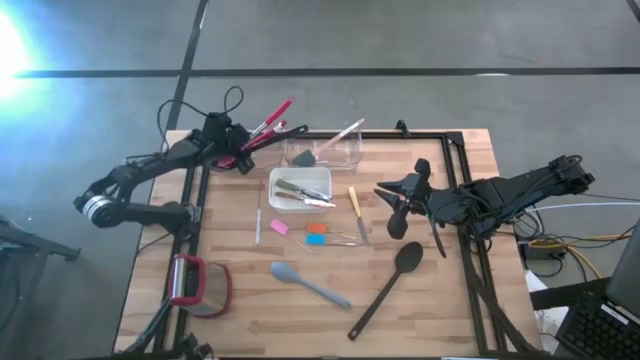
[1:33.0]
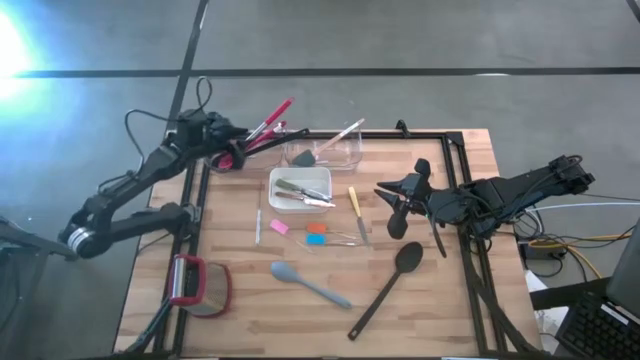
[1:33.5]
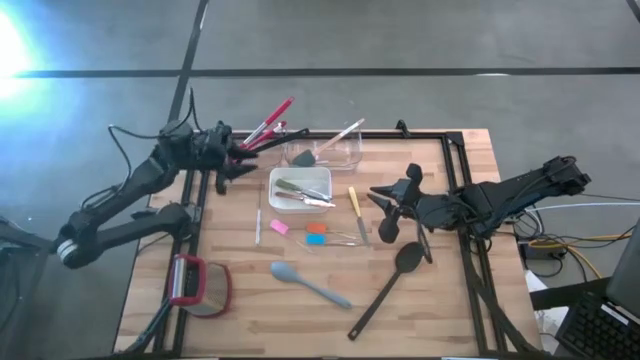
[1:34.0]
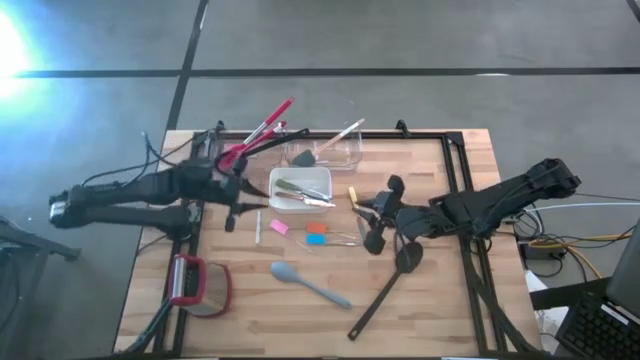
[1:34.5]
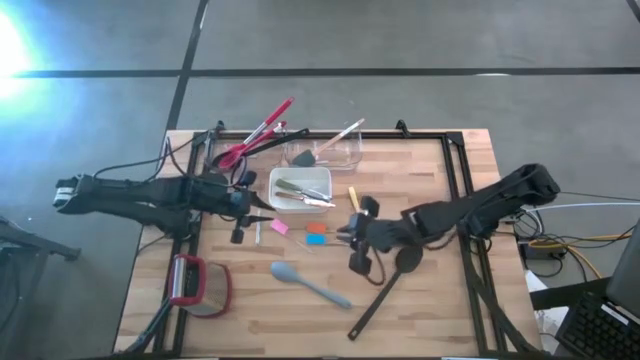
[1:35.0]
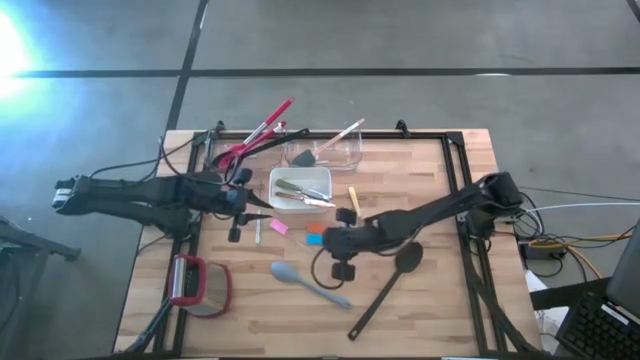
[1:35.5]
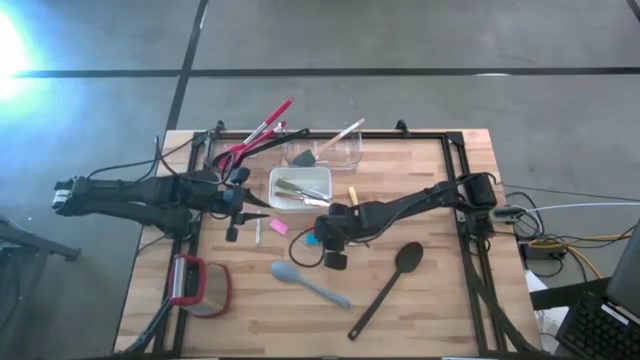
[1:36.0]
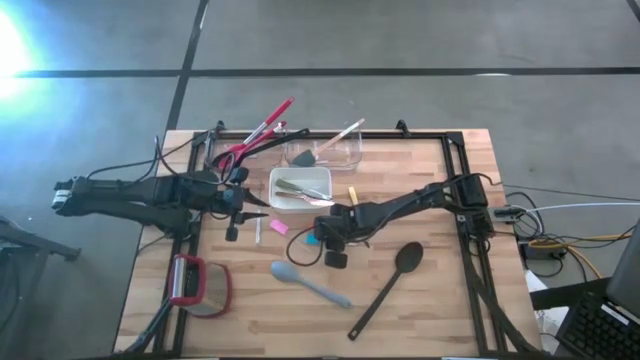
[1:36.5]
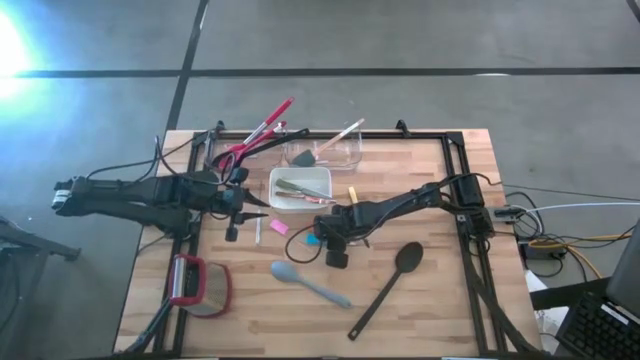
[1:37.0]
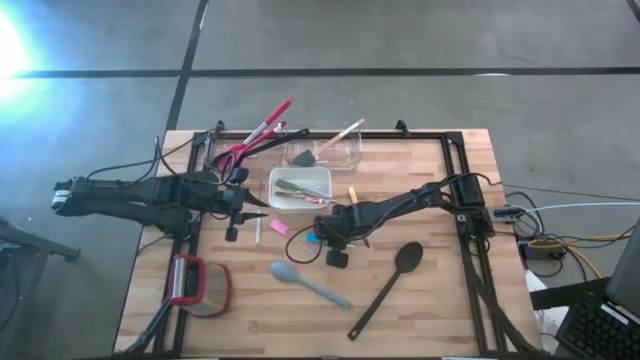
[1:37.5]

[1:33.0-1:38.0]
Task: Pick & Place Kitchen Items
Put the blue spatula into the right transparent bin

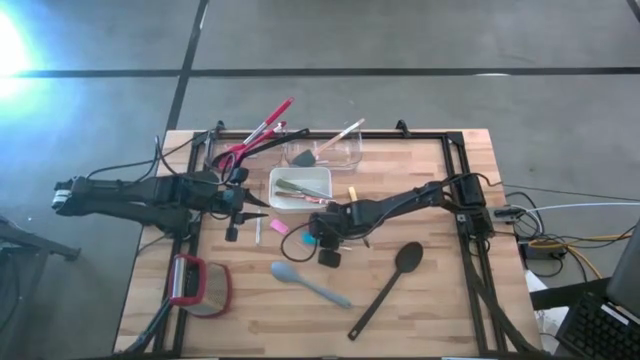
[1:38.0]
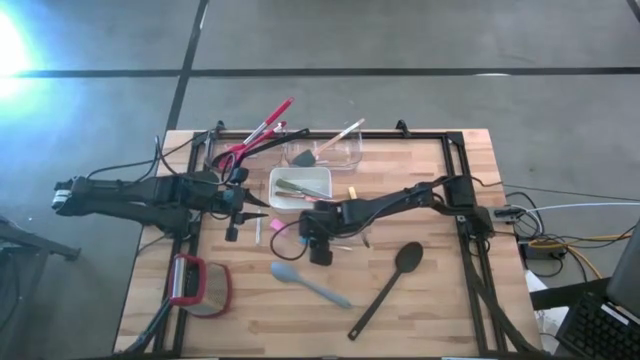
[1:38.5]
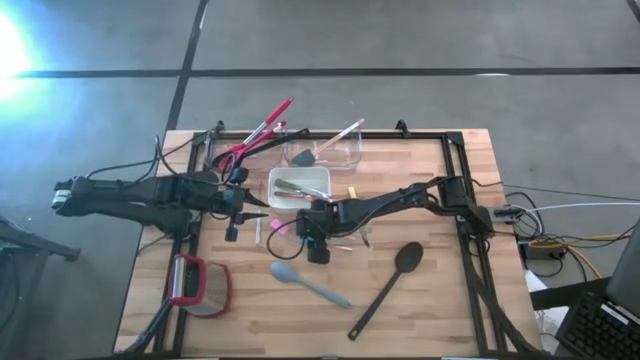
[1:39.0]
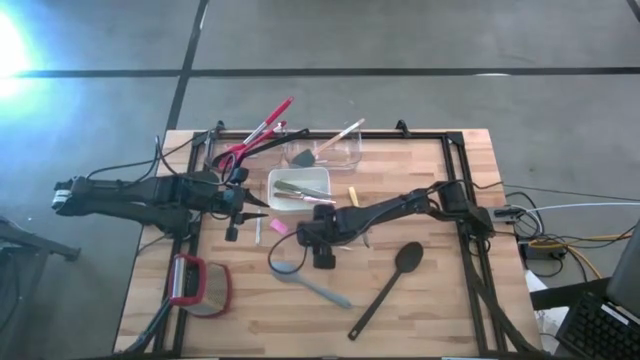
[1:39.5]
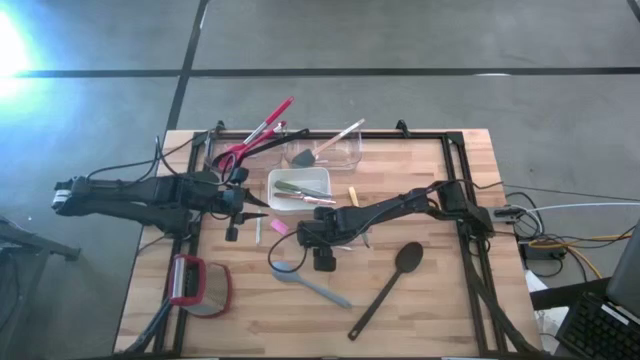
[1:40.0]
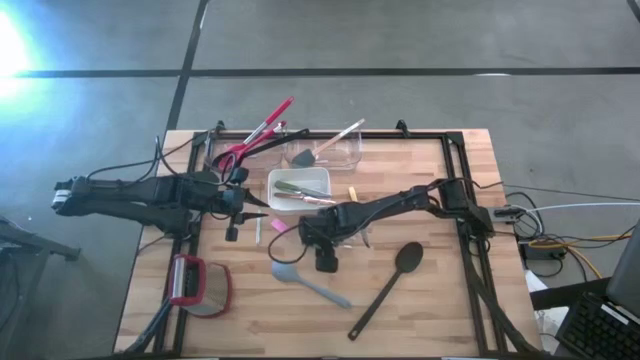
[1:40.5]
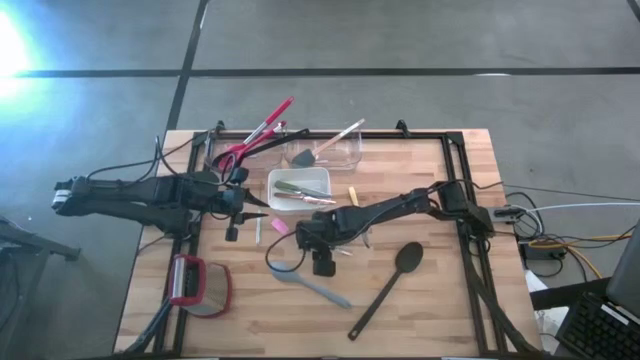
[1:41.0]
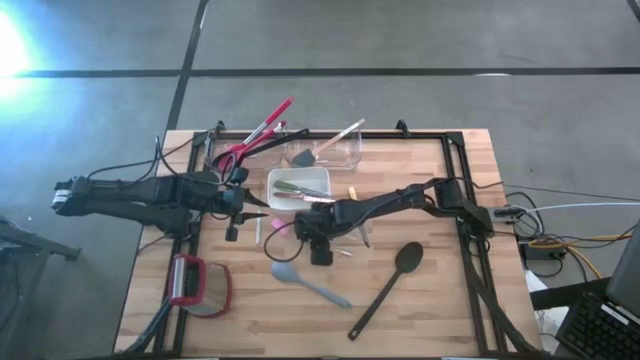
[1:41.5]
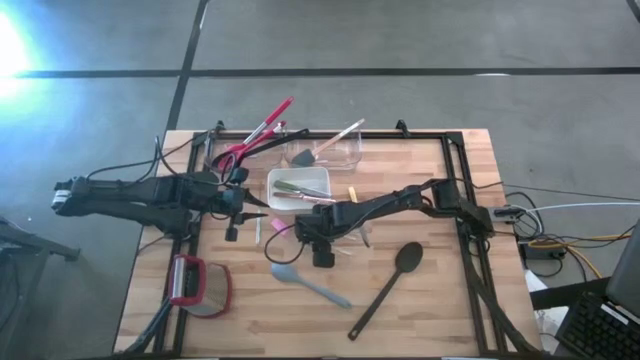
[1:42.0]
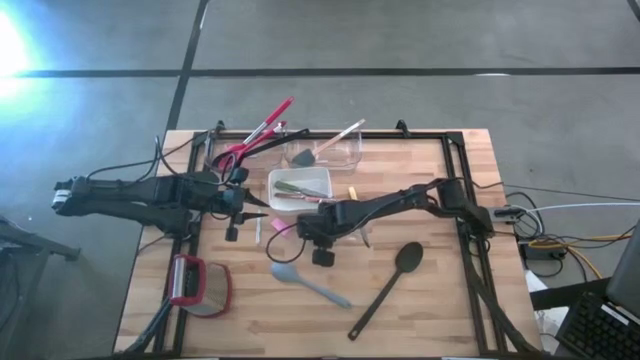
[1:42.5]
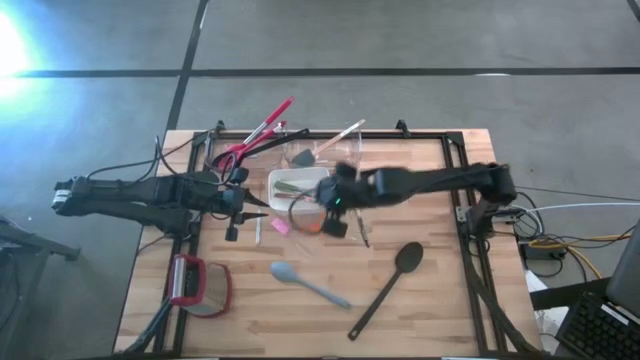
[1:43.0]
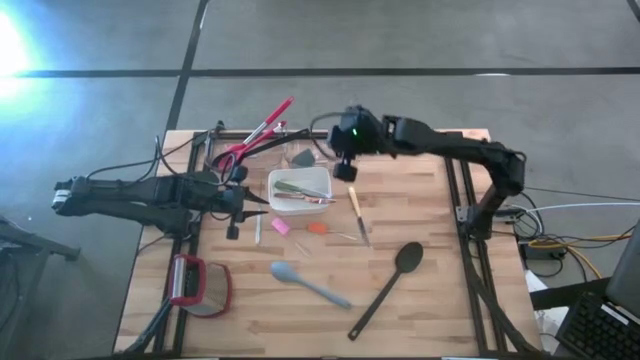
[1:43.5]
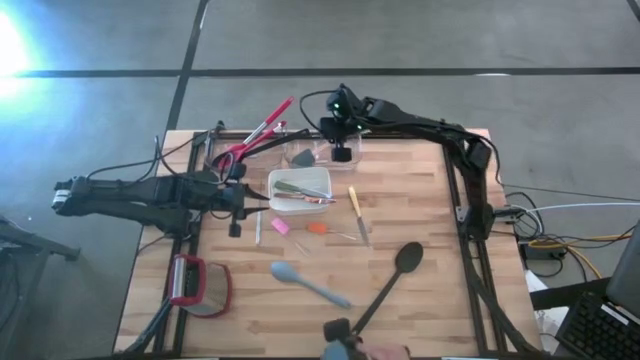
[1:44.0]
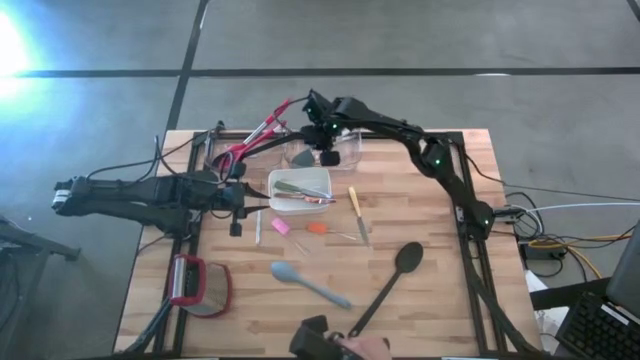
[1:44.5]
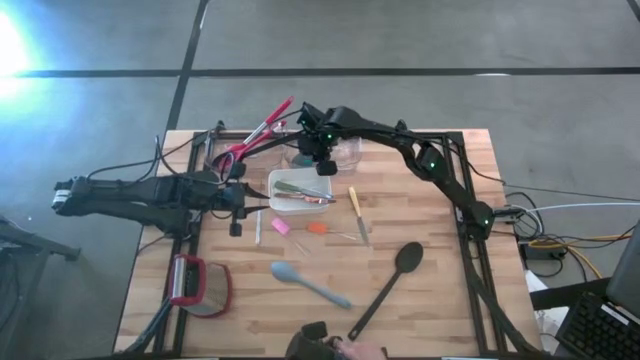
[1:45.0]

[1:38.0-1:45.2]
Put the blue spatula into the right transparent bin

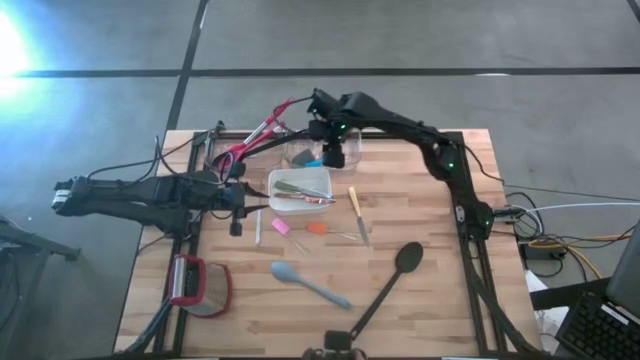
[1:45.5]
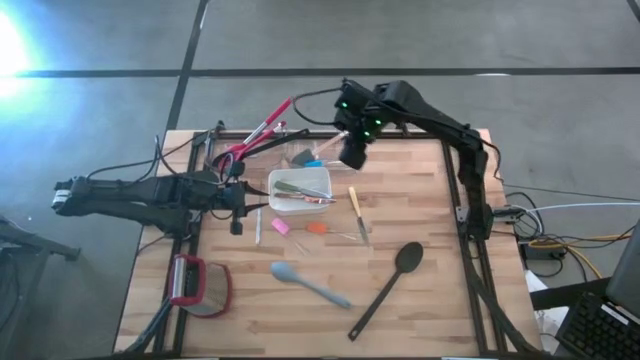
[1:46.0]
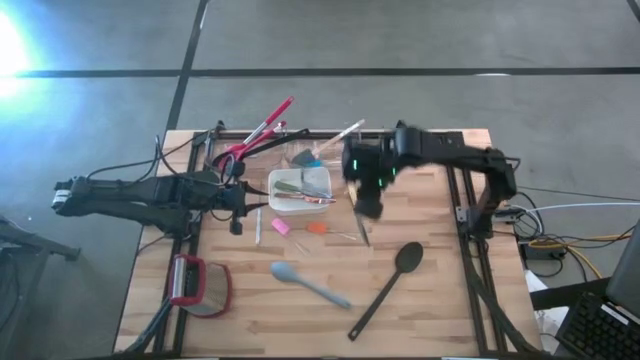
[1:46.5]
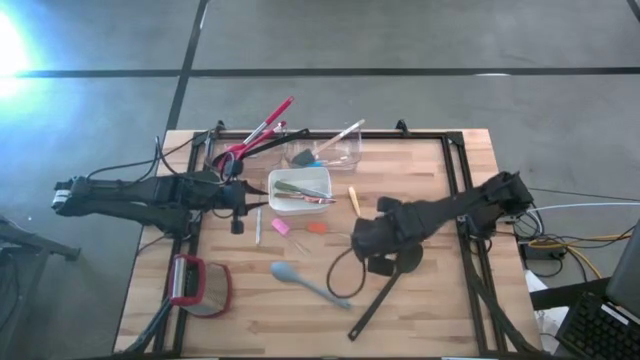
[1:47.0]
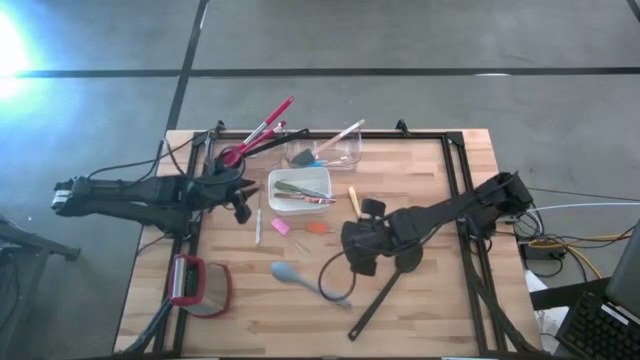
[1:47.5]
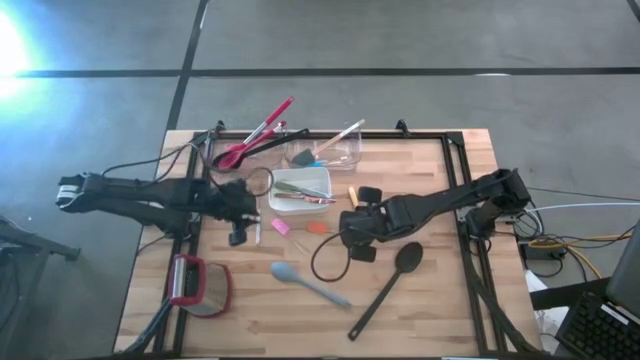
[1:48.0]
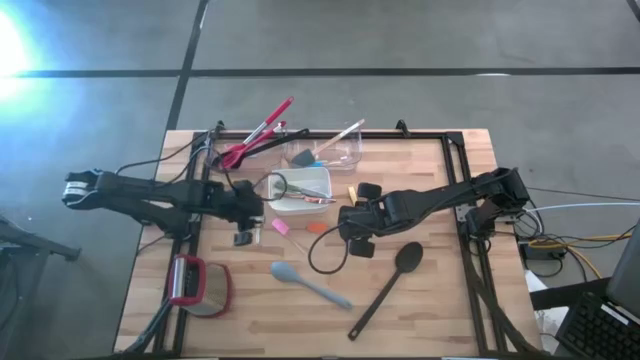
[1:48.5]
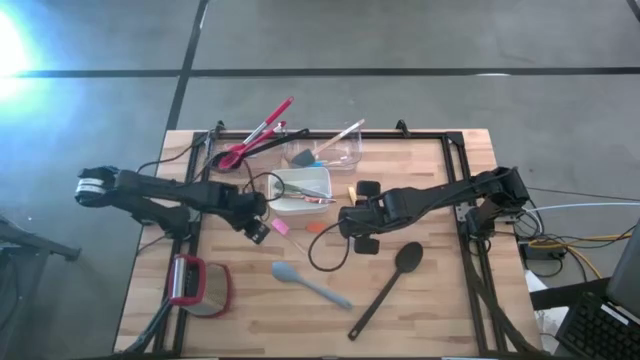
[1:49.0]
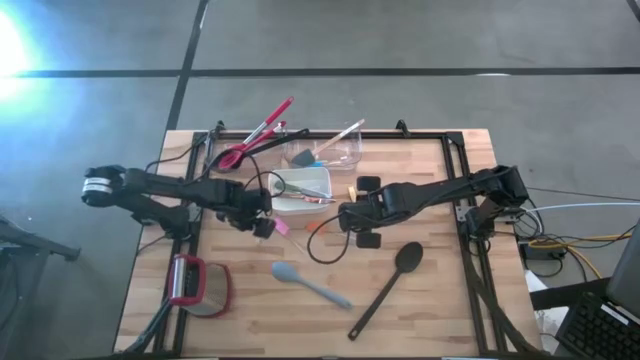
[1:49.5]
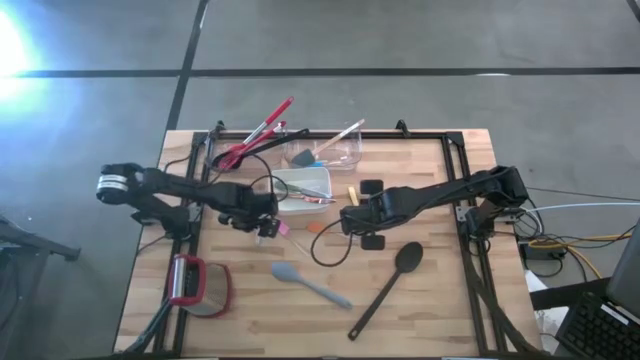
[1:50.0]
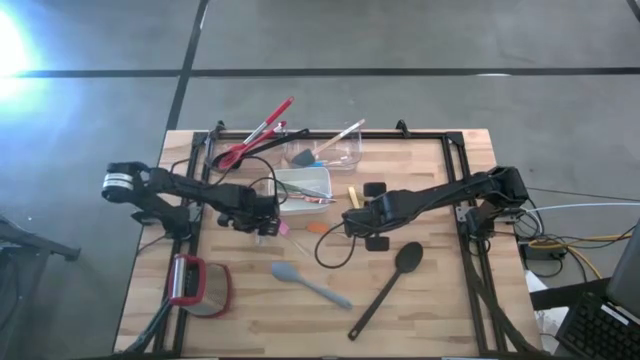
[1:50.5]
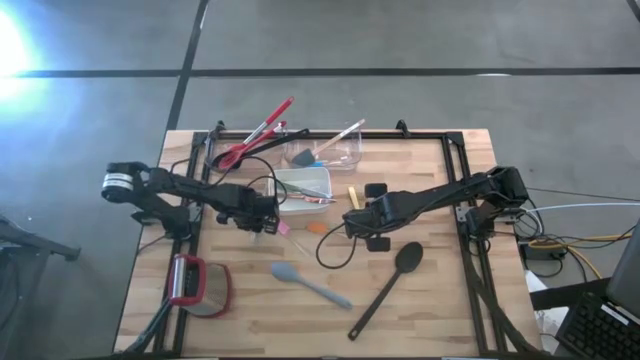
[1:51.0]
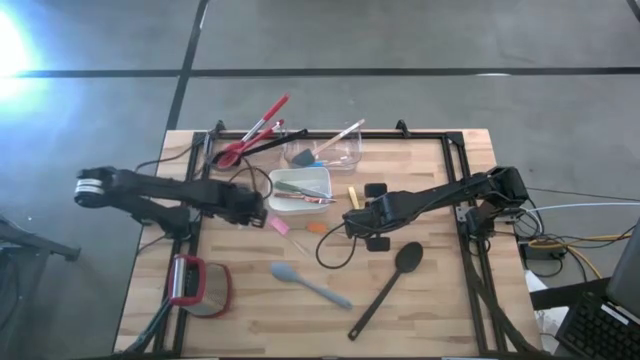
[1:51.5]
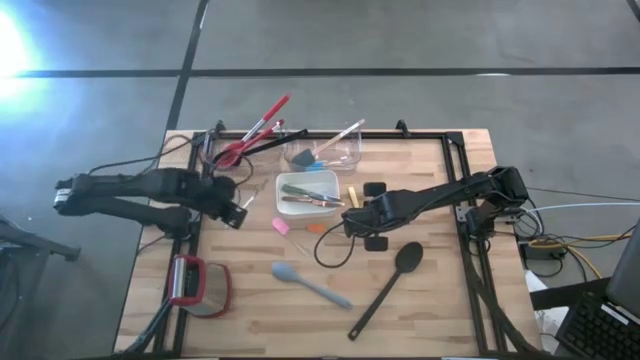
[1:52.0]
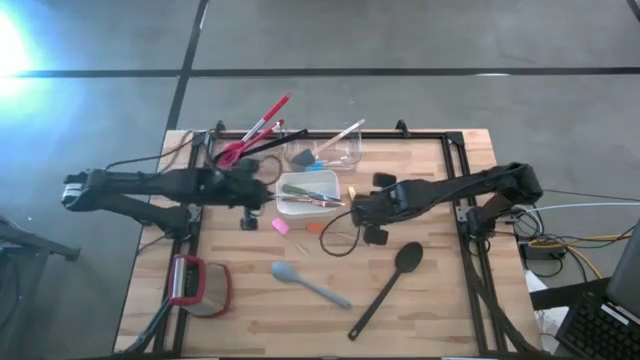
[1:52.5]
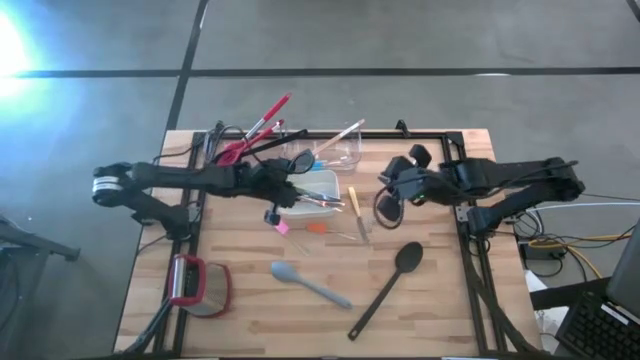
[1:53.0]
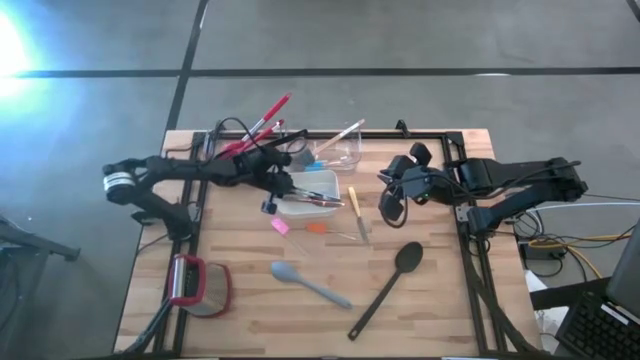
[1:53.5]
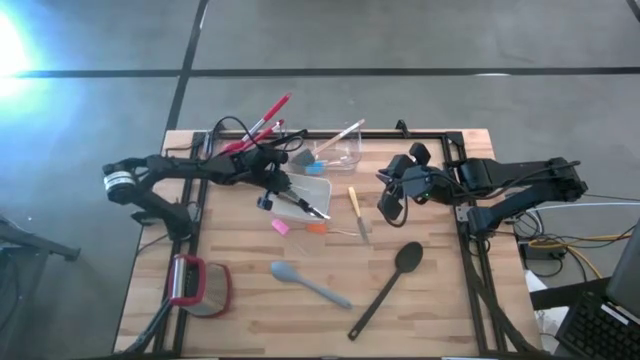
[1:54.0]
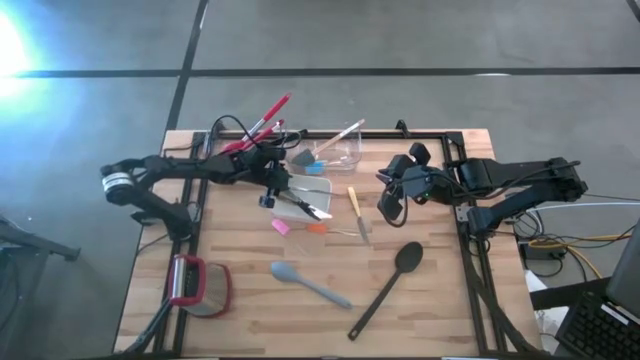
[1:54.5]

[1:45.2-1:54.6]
Put the blue knife into the white bin
